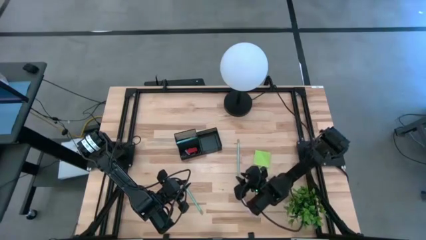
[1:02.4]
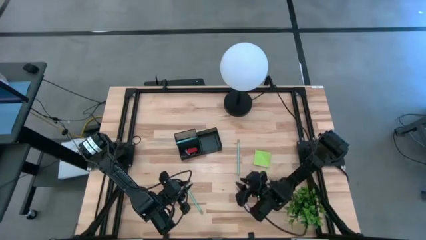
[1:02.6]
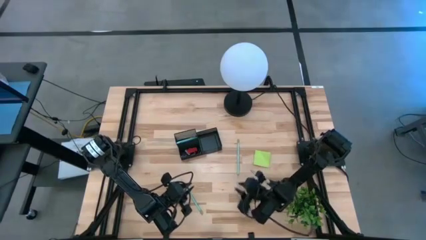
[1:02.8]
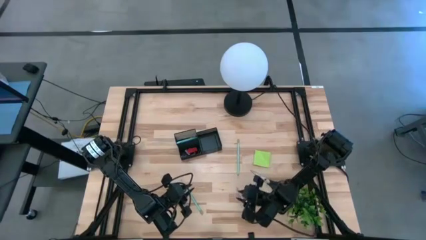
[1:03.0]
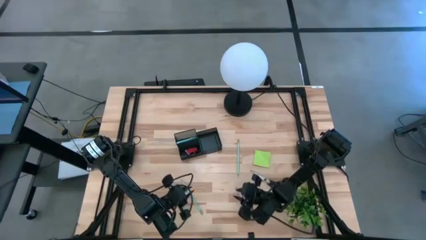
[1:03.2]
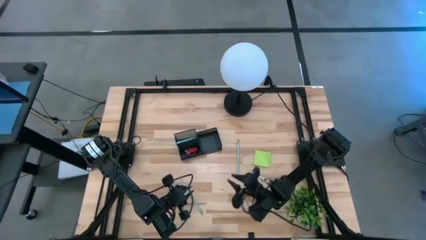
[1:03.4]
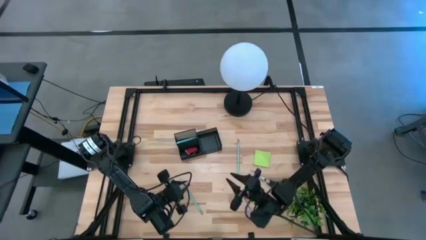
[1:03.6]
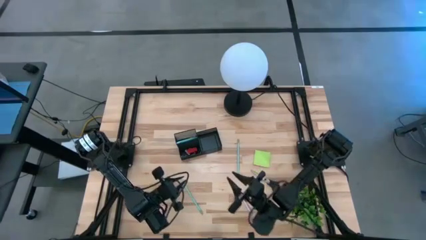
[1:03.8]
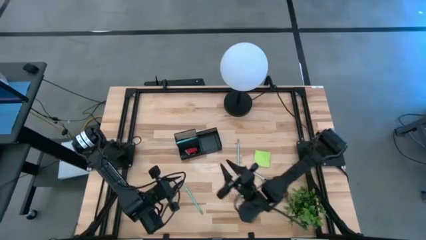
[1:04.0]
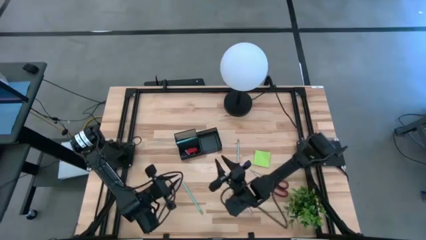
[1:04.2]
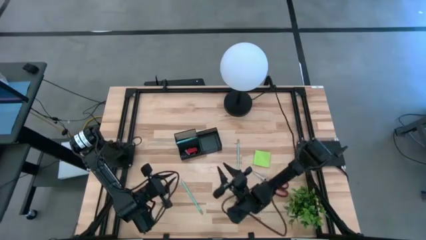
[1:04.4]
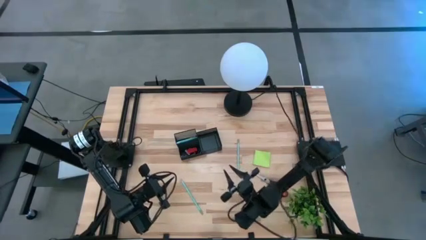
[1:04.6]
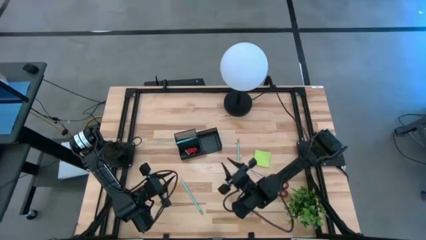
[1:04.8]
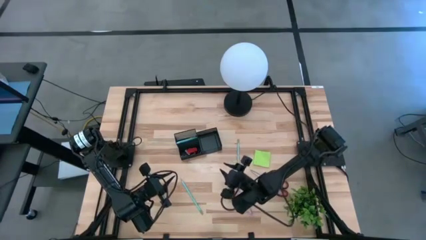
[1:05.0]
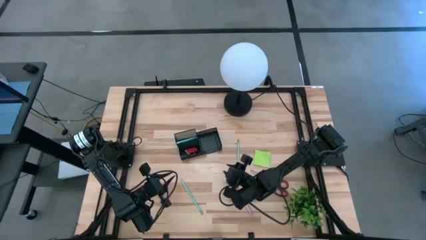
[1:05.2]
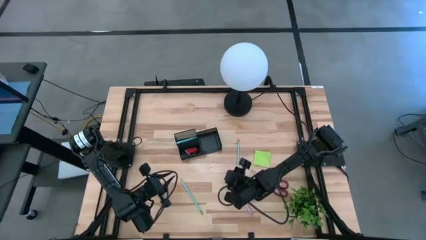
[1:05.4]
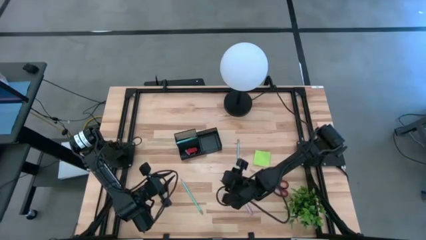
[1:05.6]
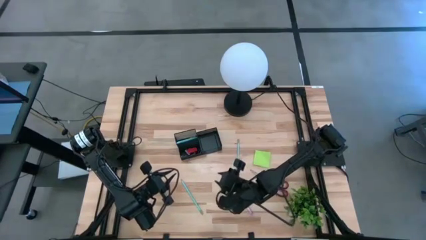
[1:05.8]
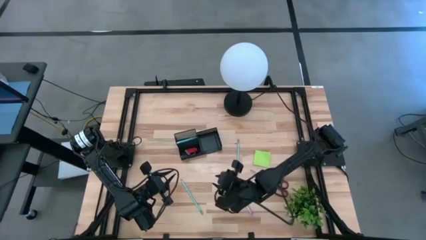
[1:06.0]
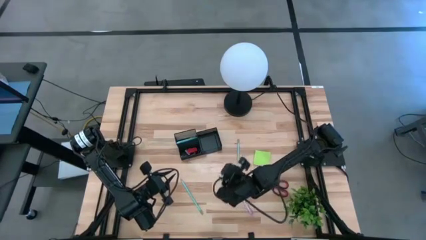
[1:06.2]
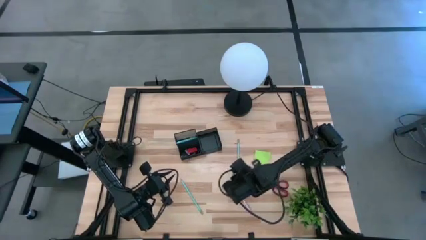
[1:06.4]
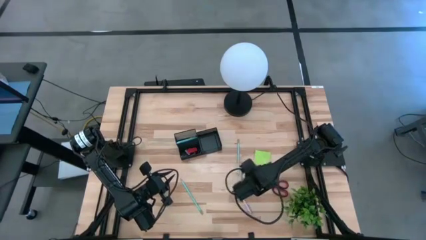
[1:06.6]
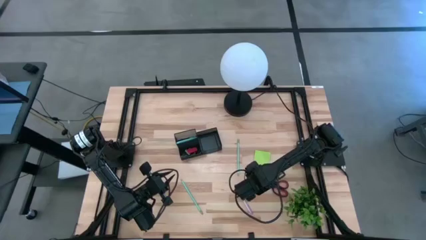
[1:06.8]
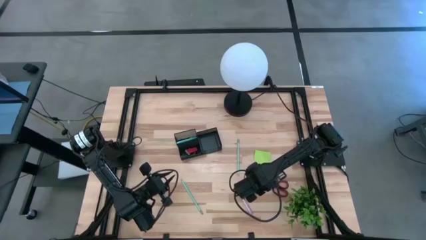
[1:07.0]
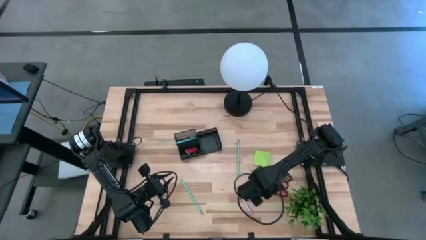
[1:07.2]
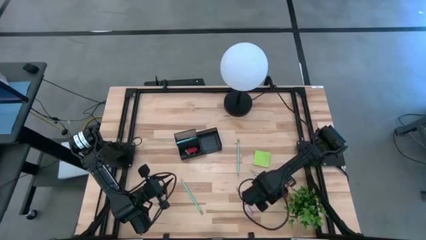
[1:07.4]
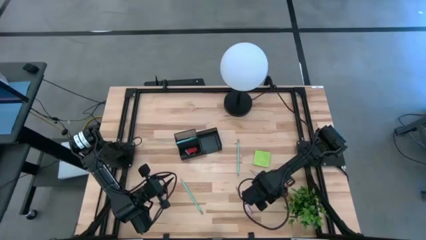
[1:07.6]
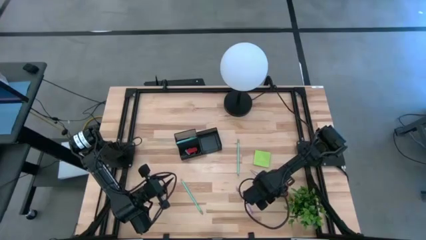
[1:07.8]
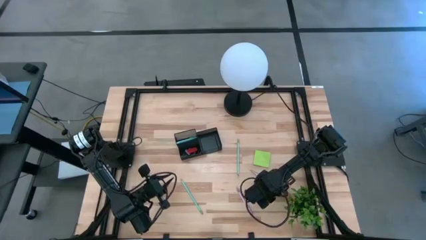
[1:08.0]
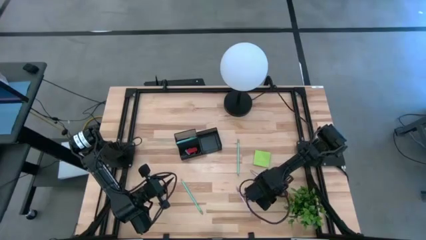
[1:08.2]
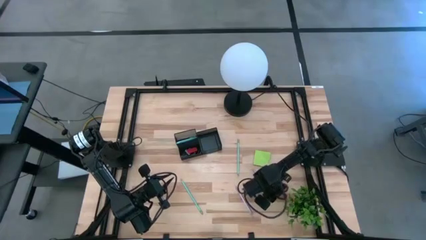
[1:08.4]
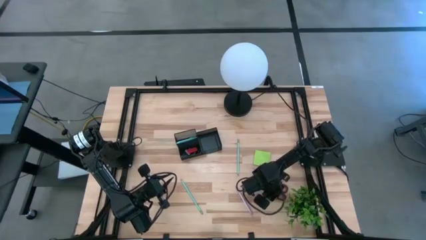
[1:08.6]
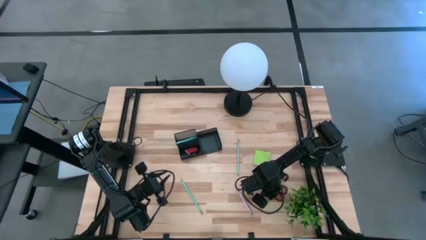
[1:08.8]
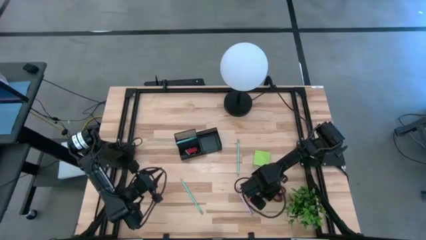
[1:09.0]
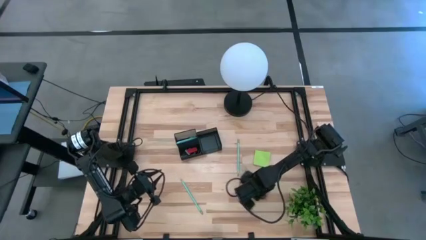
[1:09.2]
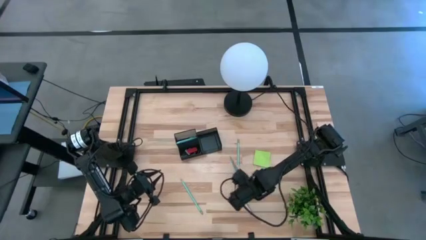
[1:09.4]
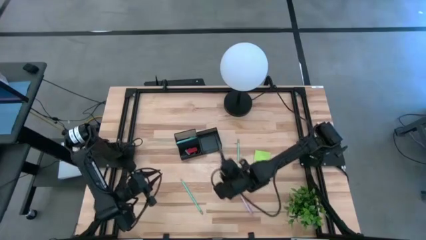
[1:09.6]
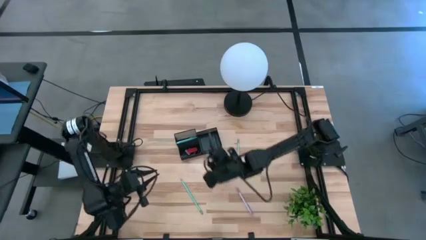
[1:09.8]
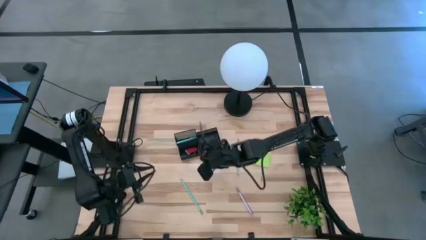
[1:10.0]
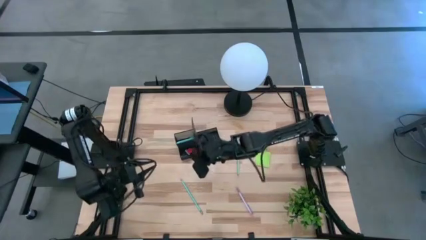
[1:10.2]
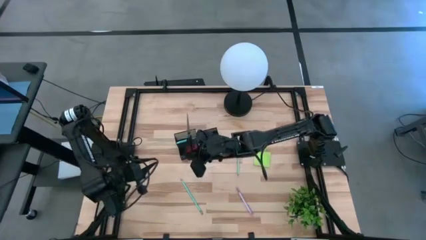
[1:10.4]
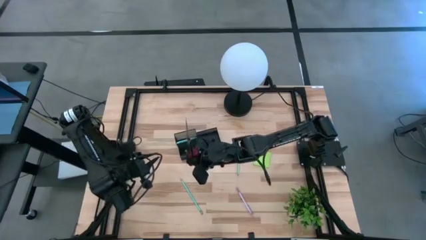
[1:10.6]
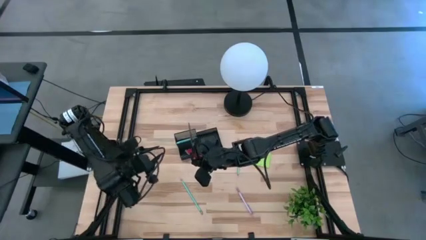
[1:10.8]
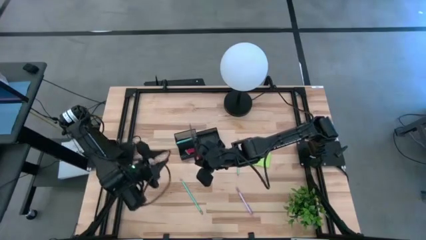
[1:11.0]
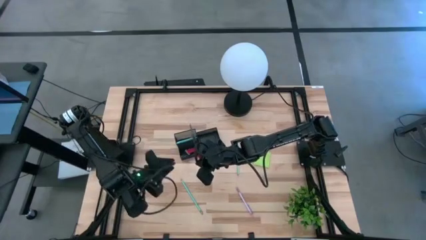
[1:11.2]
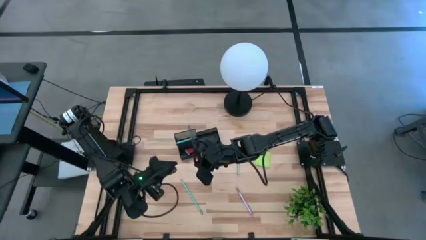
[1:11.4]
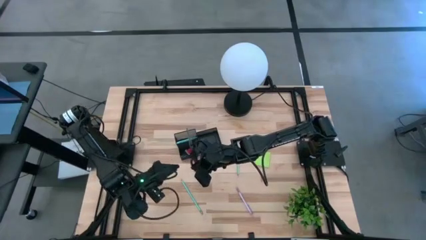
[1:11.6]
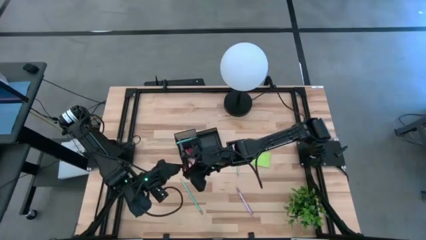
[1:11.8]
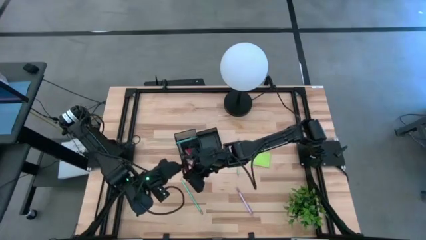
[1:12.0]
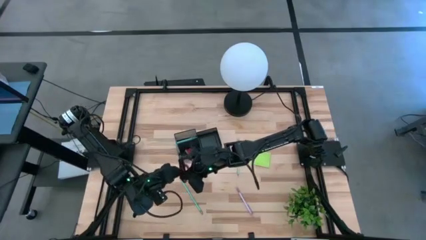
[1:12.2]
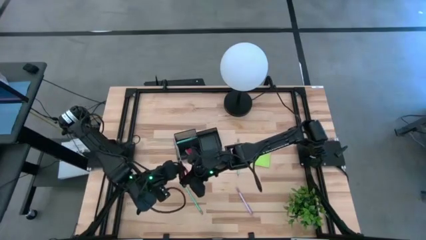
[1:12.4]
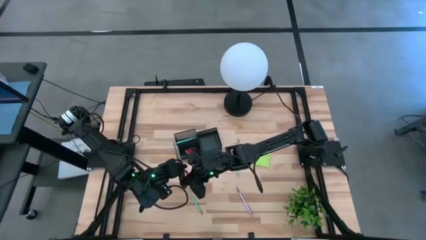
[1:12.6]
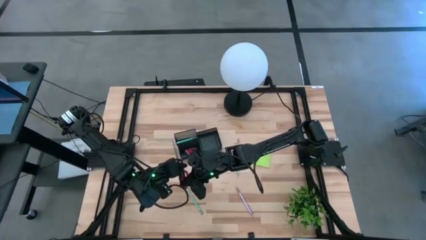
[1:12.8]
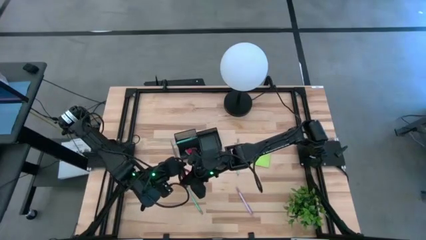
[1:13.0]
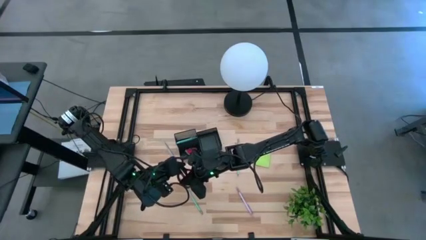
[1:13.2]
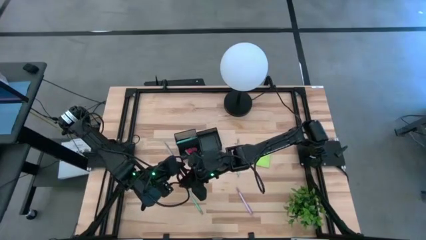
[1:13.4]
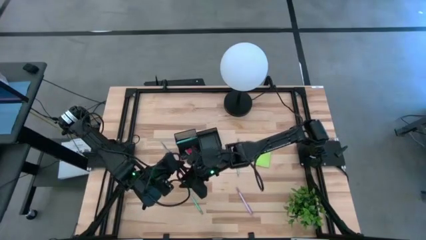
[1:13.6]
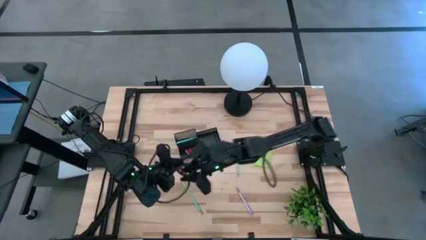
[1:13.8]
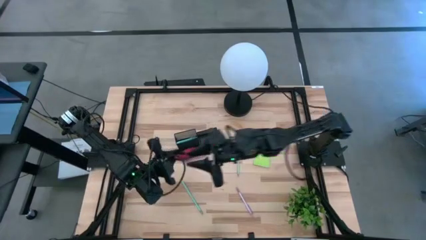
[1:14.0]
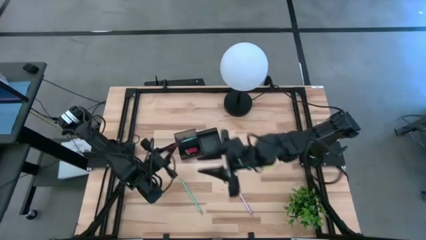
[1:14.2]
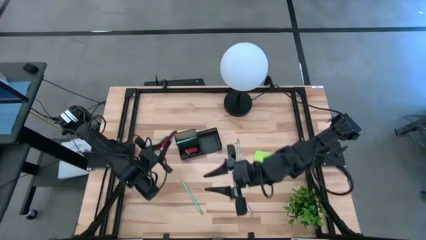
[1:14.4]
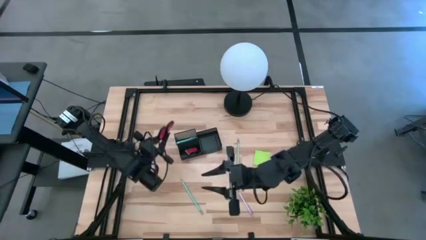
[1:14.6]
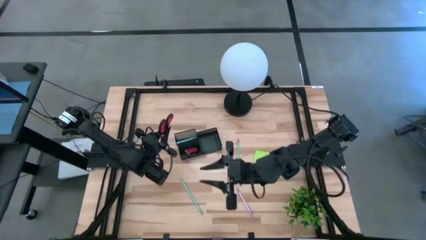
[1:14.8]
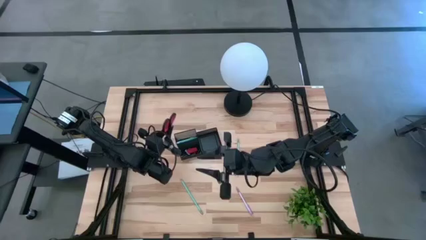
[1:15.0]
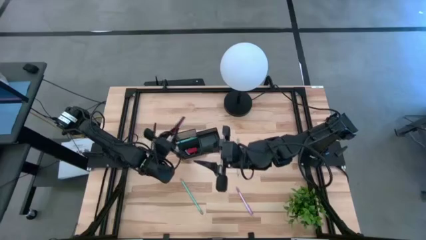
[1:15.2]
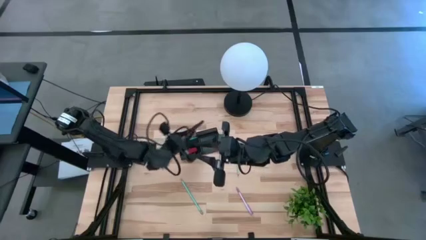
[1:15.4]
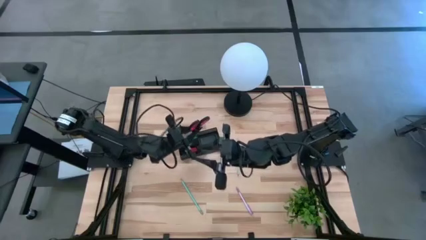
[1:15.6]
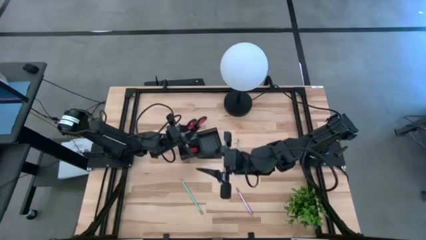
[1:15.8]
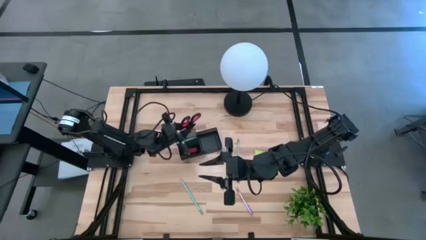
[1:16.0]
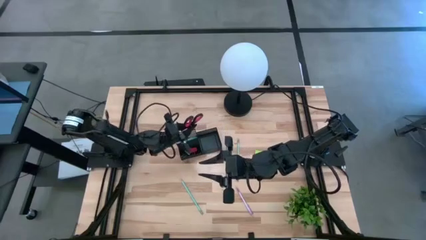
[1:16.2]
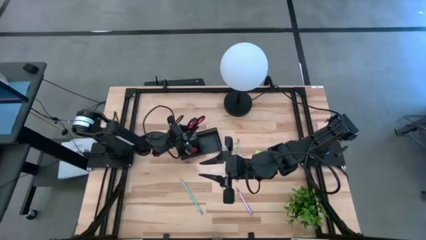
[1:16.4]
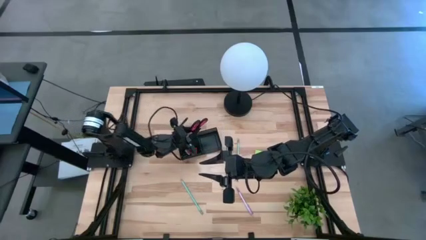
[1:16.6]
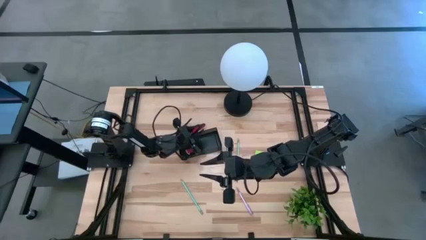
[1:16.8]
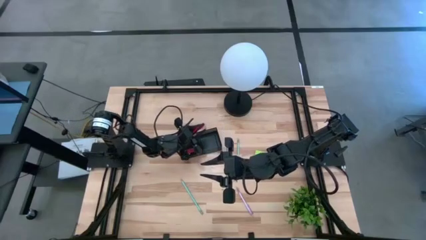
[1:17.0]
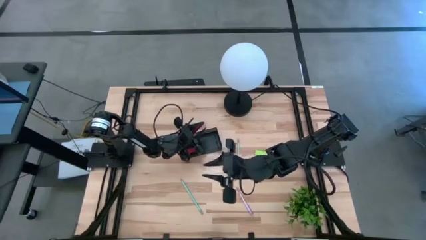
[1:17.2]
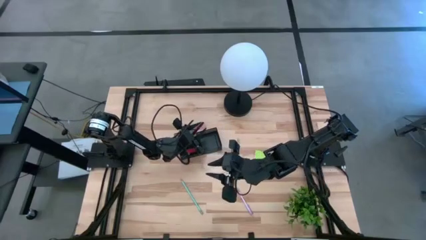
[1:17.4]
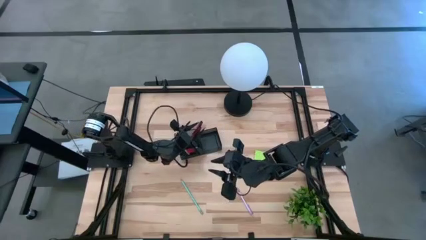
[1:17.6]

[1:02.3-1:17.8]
Task: Pick and place office supplies into organizer
Put the black scissors into the black desk organizer
